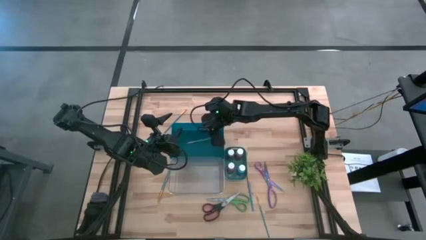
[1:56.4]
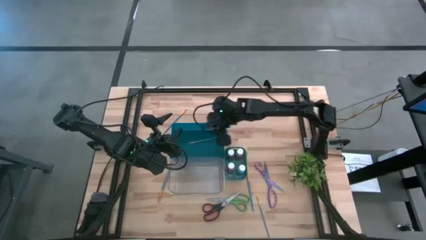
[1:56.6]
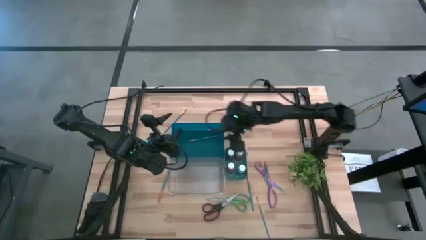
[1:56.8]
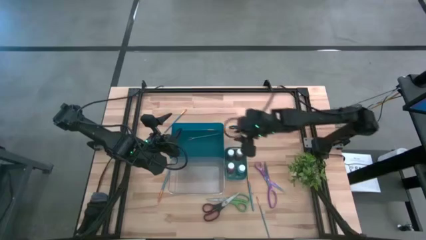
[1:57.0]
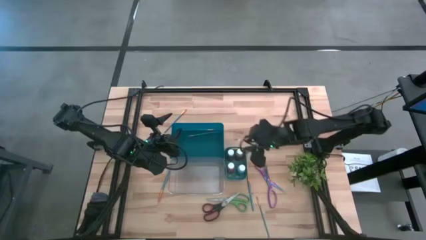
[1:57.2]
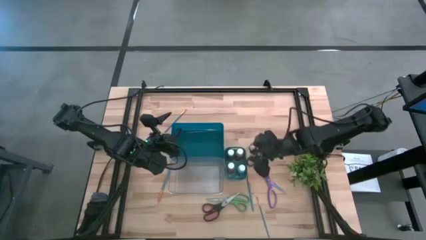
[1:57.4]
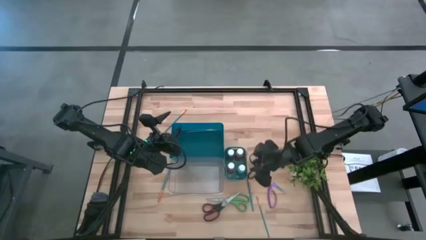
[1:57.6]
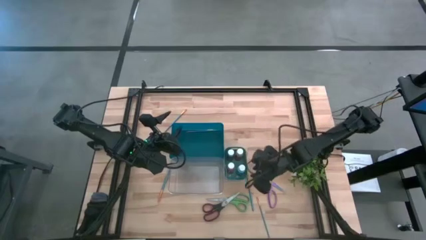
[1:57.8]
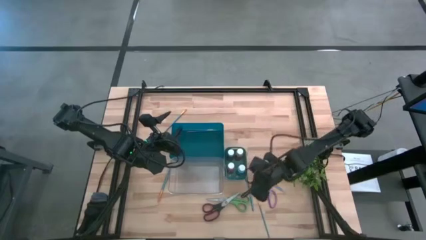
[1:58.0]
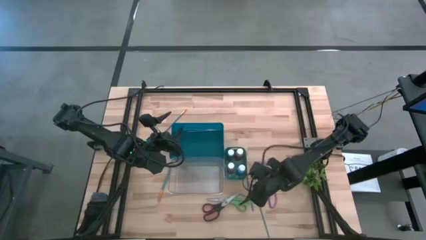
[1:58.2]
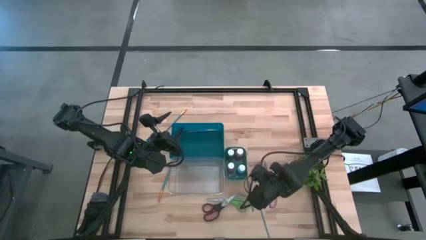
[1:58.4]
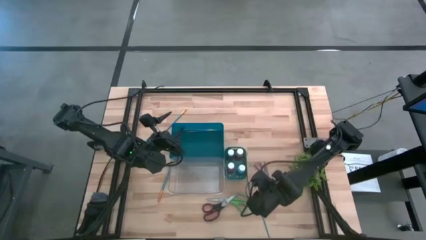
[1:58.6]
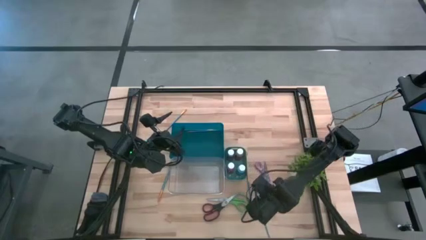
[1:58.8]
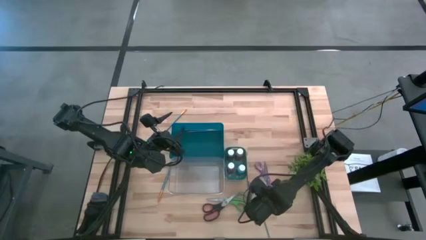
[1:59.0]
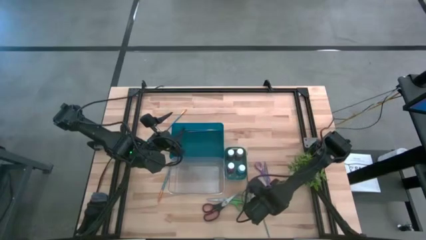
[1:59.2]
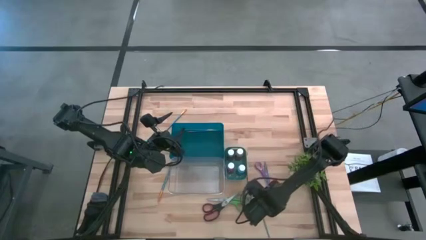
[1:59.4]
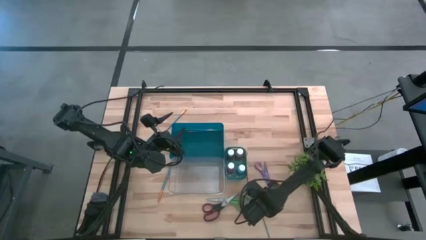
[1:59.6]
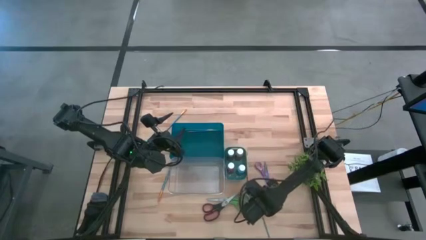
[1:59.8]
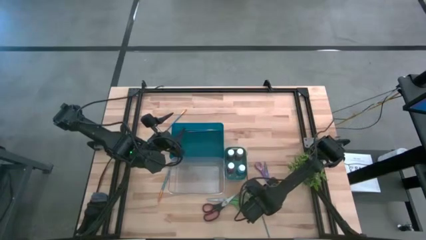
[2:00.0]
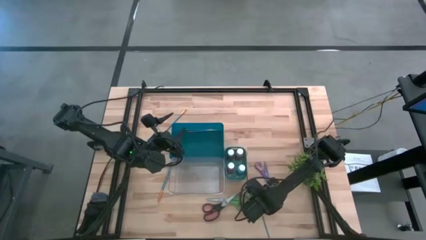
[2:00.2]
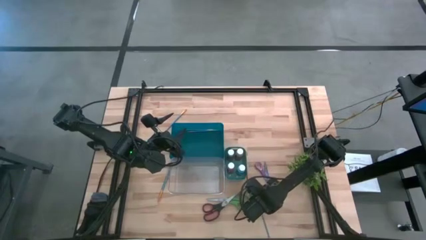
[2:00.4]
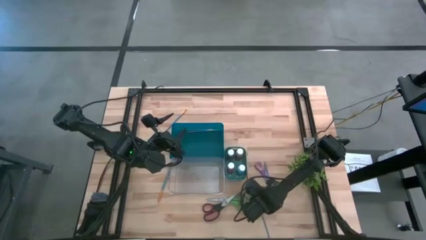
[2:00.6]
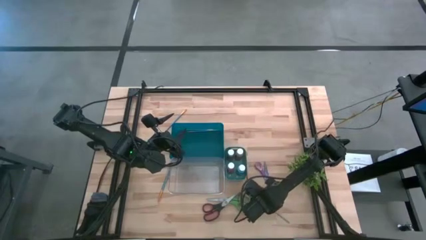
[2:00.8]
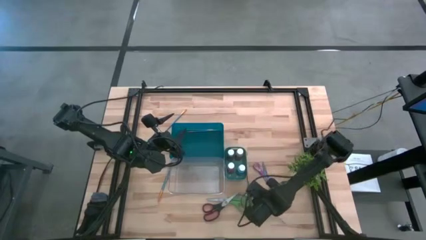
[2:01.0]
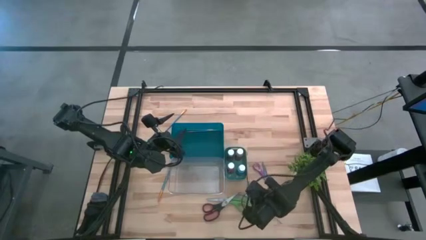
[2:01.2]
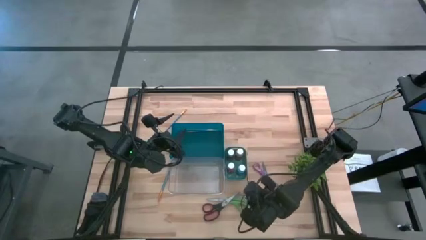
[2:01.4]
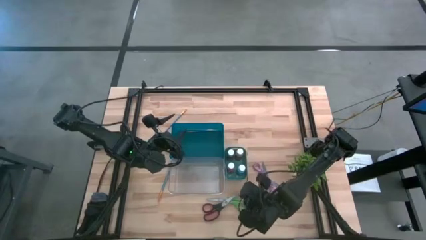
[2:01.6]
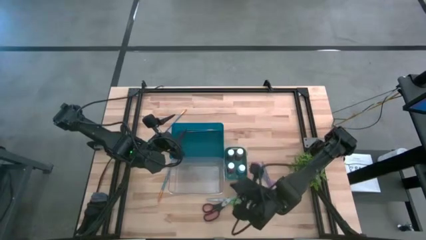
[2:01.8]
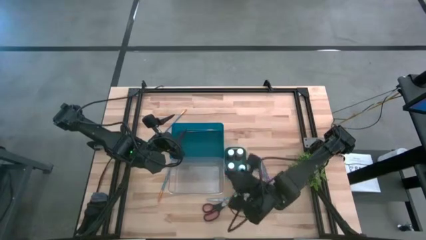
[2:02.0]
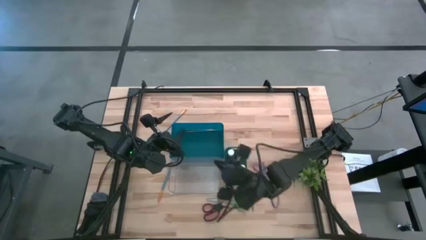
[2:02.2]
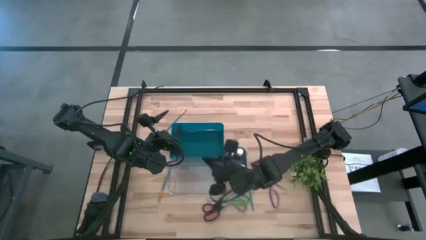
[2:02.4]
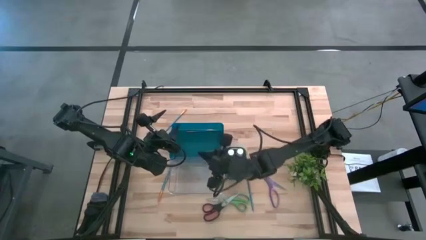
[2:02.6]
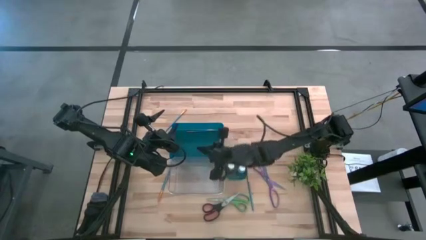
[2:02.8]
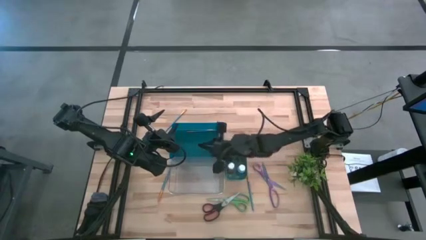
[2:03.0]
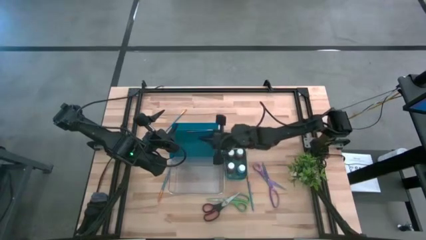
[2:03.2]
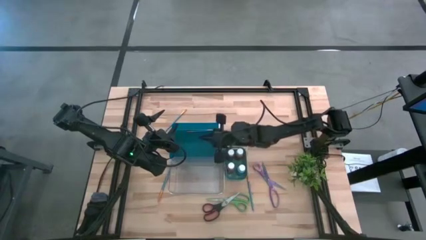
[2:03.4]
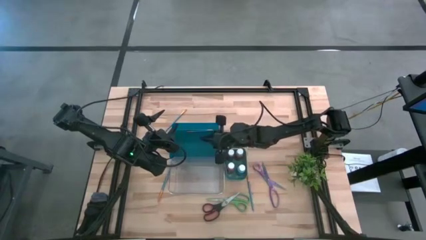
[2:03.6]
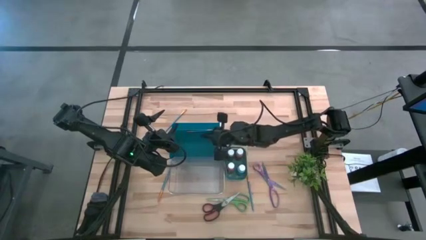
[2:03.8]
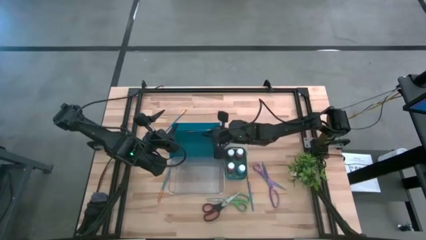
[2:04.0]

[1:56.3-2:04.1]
Task: Pick & Place Paint Supplies
Put the blue paint brush into the blue bin

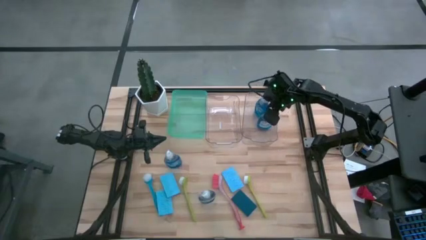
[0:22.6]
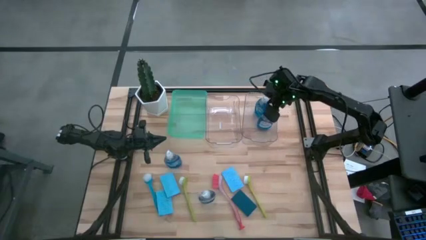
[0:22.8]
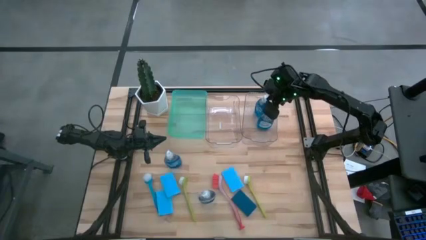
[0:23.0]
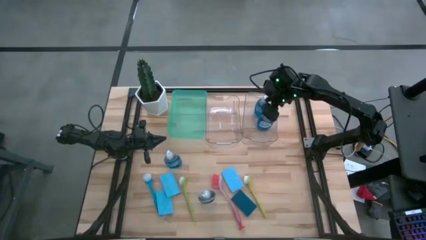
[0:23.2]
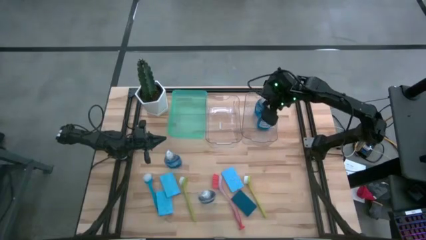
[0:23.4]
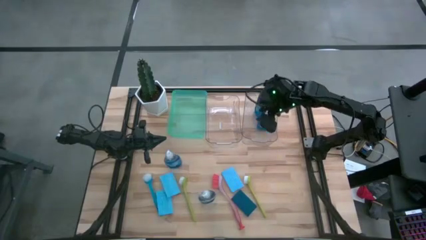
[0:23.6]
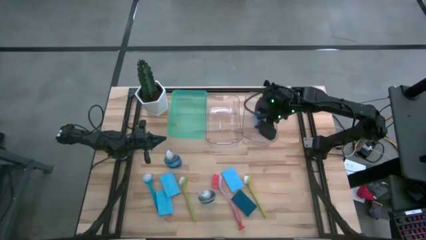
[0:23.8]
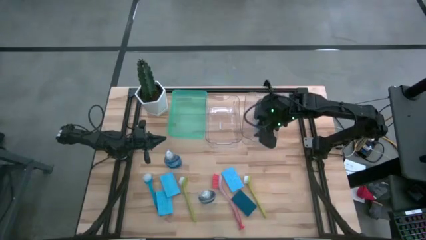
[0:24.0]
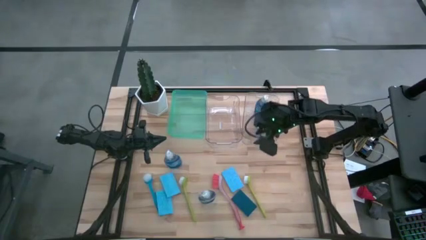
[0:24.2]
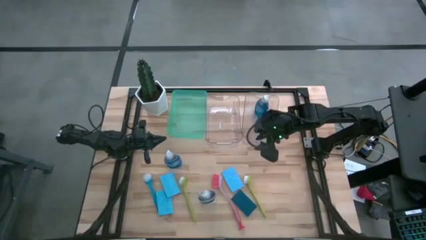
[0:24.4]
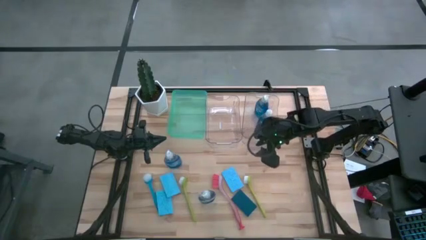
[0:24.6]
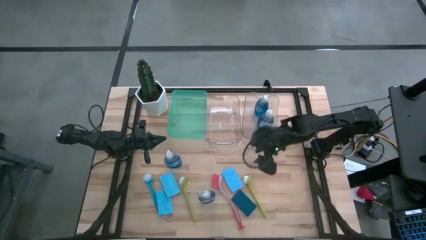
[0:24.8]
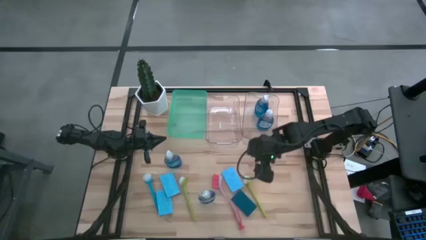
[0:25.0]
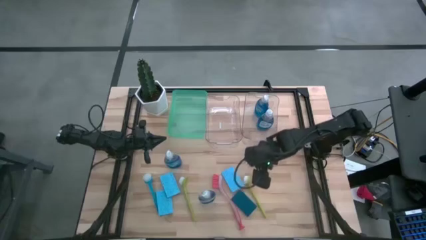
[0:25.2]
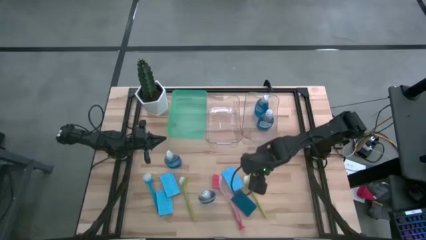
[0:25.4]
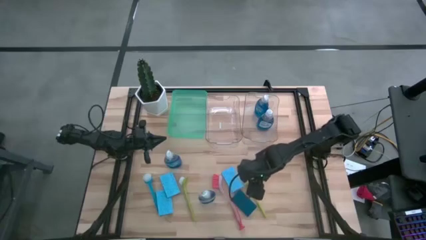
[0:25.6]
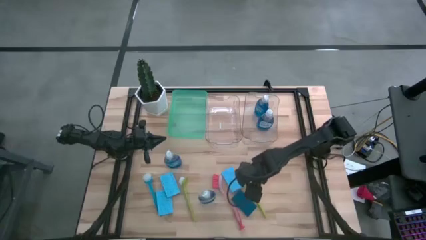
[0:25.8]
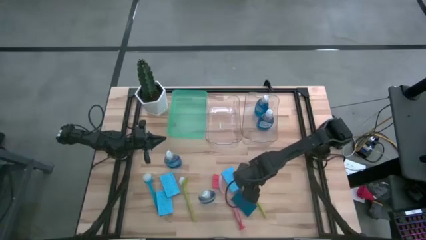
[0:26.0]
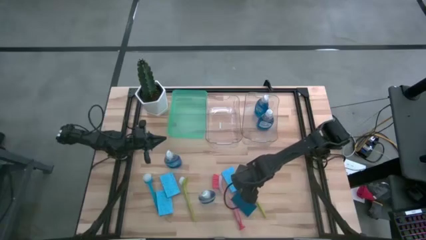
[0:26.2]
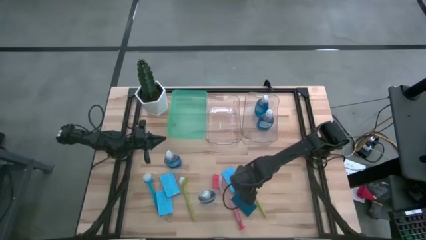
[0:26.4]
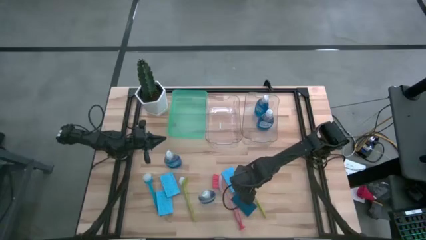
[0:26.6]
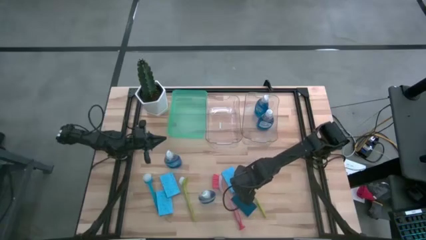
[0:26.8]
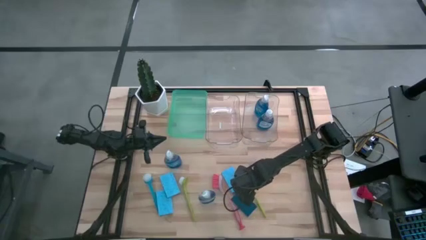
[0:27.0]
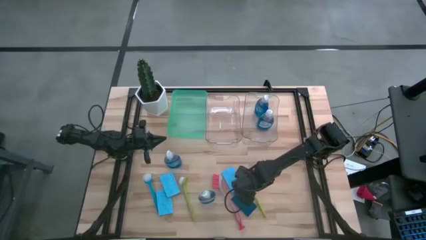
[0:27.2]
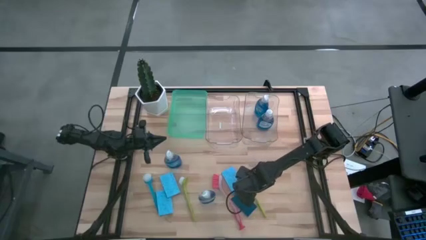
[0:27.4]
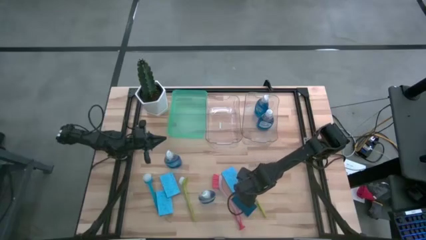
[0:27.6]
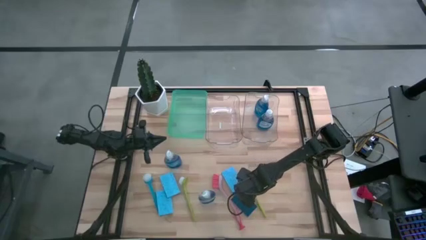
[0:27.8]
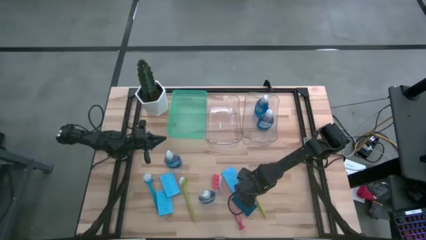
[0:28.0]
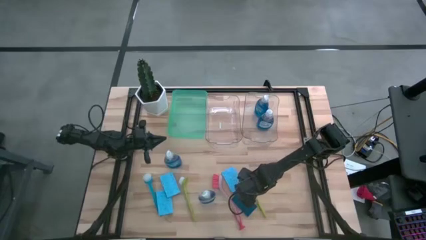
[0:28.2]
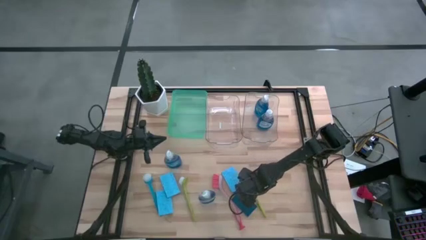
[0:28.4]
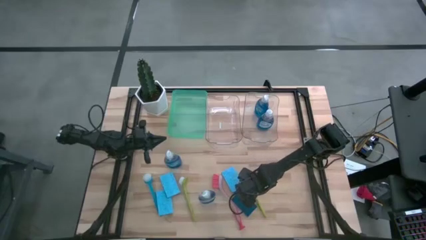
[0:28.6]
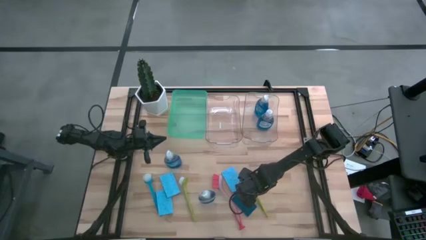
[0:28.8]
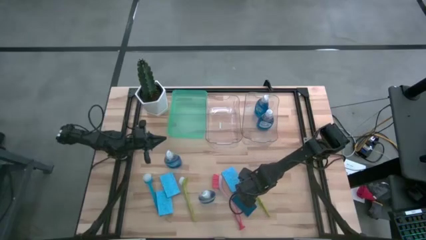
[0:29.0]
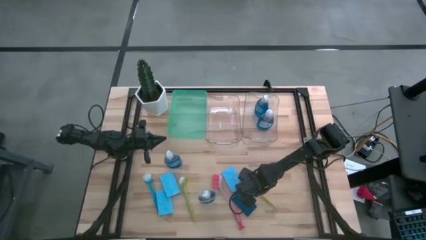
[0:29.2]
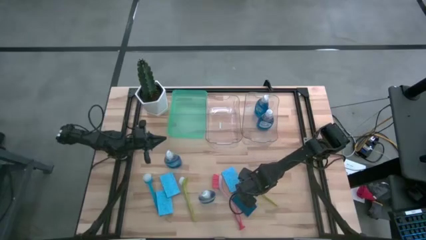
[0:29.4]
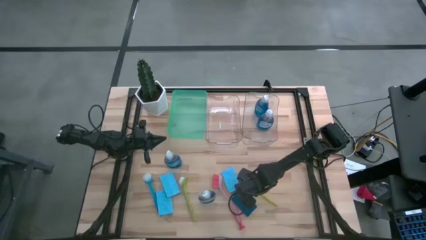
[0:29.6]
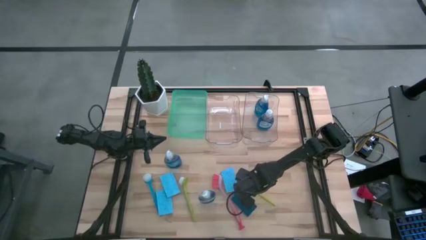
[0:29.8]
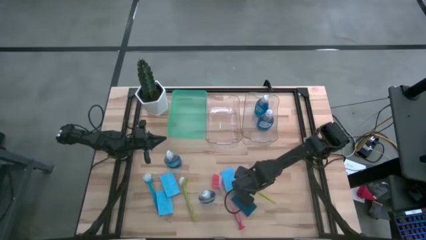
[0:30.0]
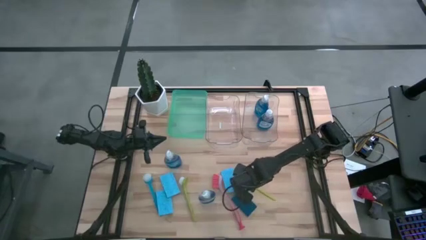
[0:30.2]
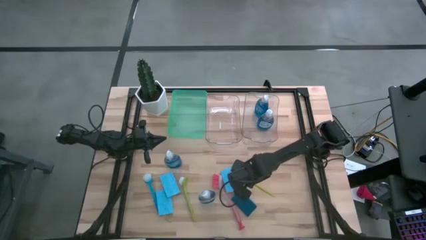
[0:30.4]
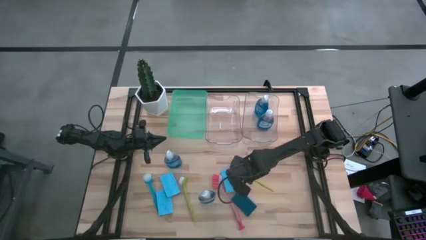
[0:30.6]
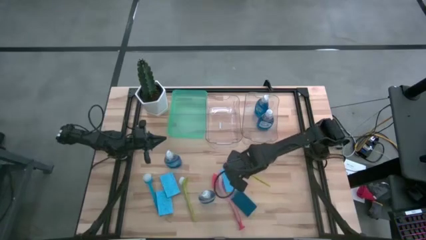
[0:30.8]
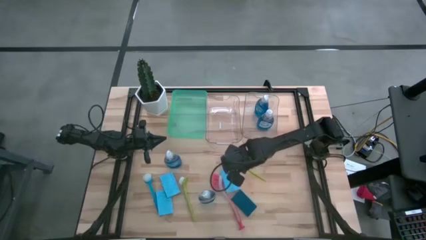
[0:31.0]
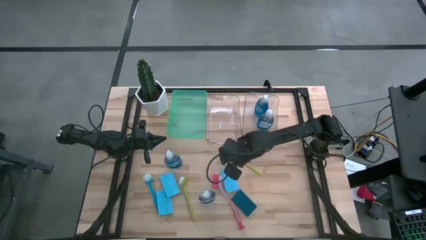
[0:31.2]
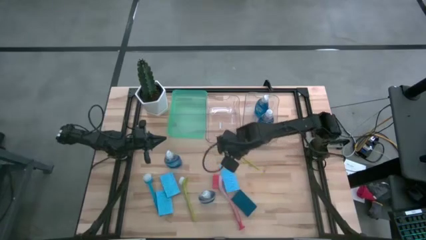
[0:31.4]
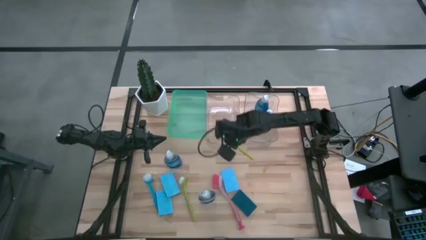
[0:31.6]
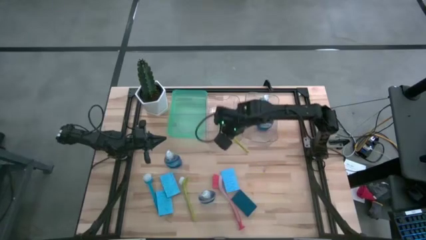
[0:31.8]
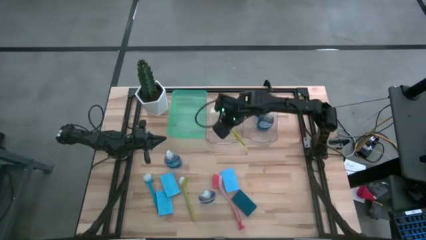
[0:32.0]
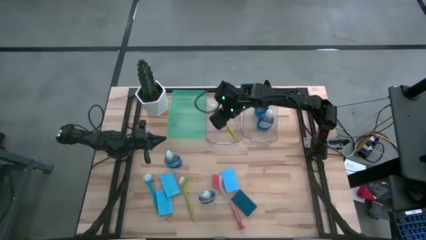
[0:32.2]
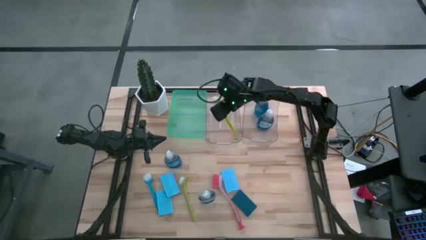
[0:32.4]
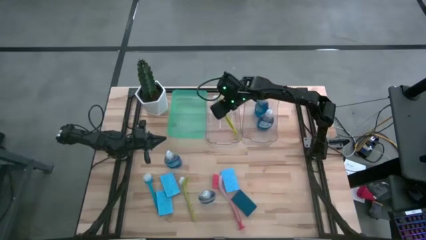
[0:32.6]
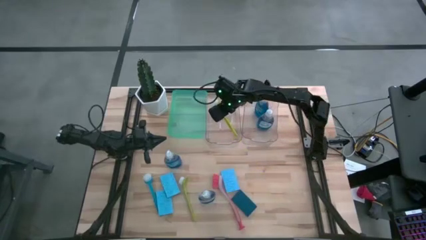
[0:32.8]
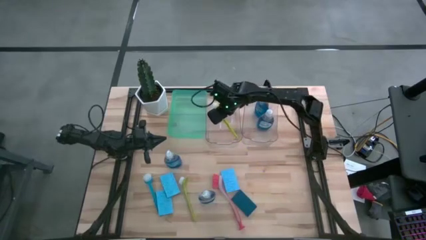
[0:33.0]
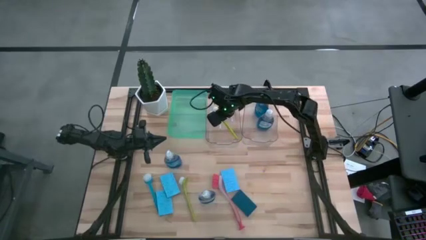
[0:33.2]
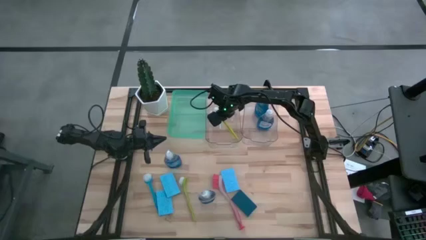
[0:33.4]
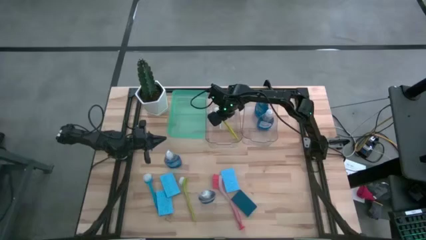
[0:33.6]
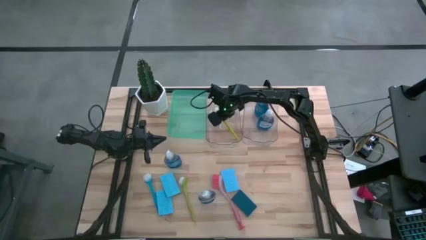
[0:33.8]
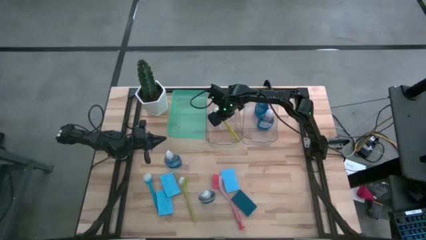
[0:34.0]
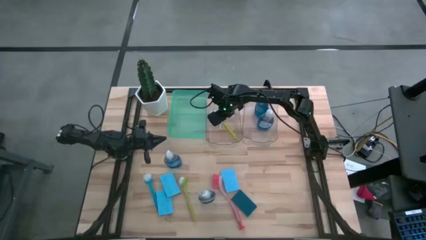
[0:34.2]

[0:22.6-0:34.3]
Task: Pick & Place Kitchen Sink Supplies
Put the green dish brush into the left transparent bin
